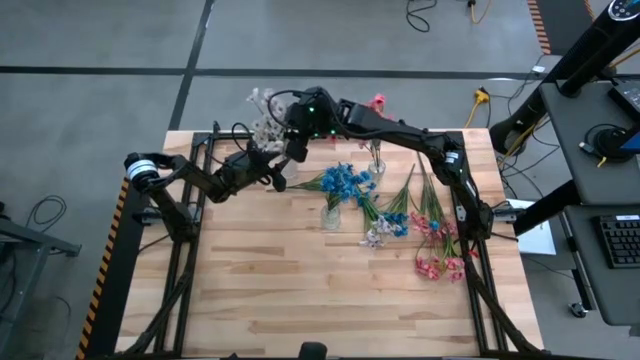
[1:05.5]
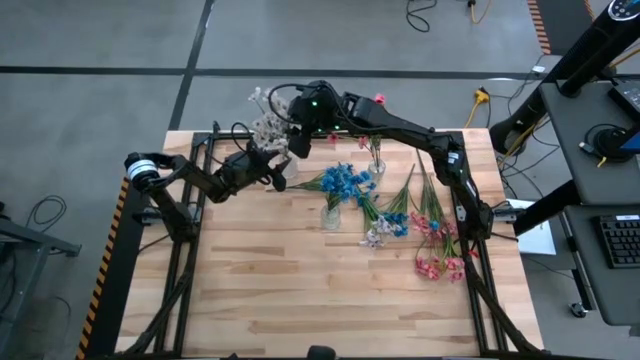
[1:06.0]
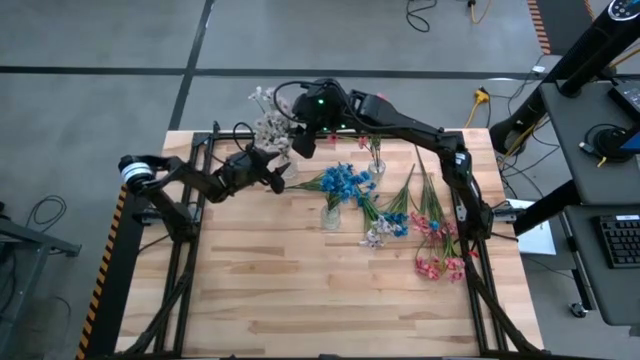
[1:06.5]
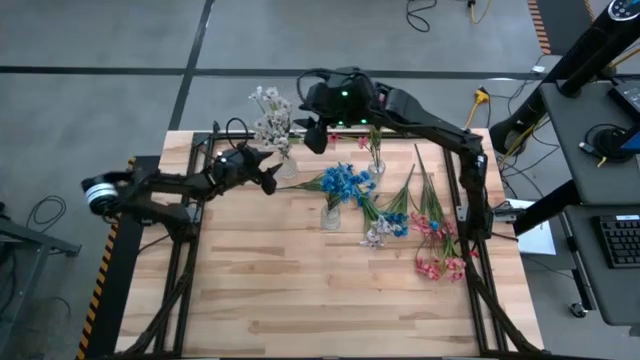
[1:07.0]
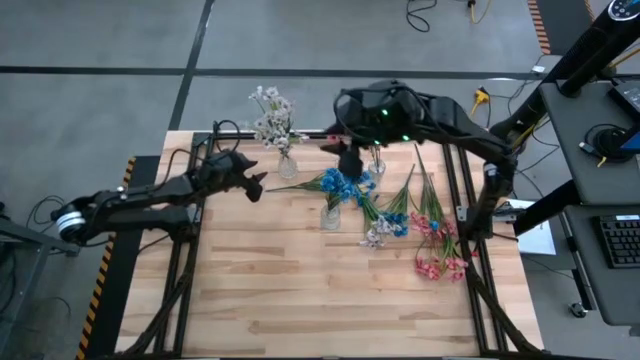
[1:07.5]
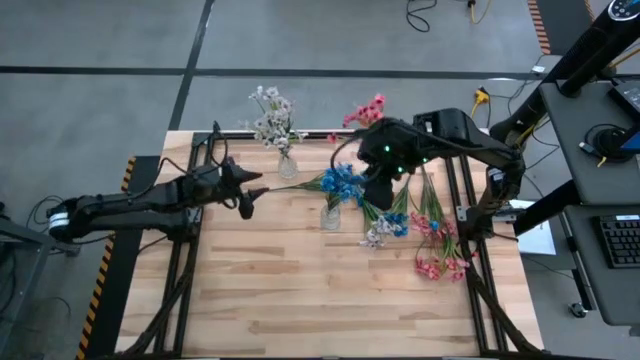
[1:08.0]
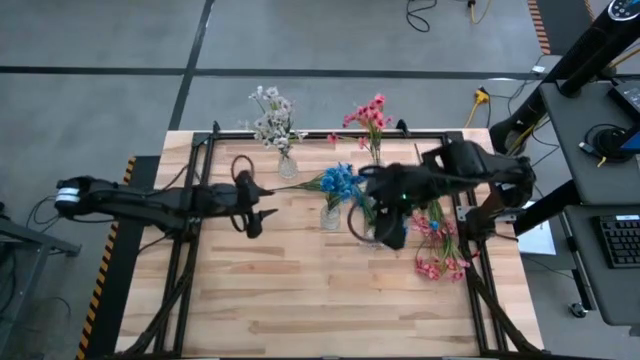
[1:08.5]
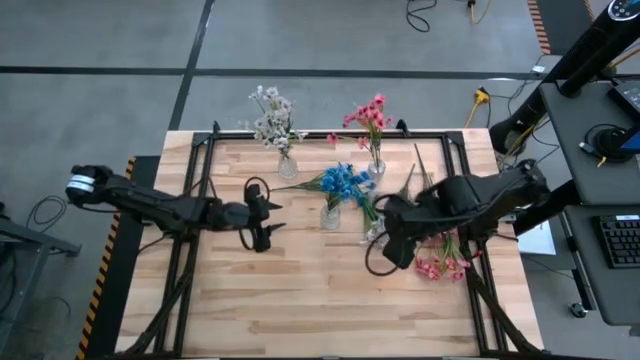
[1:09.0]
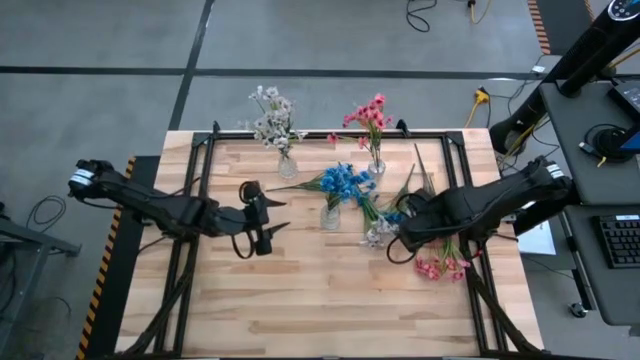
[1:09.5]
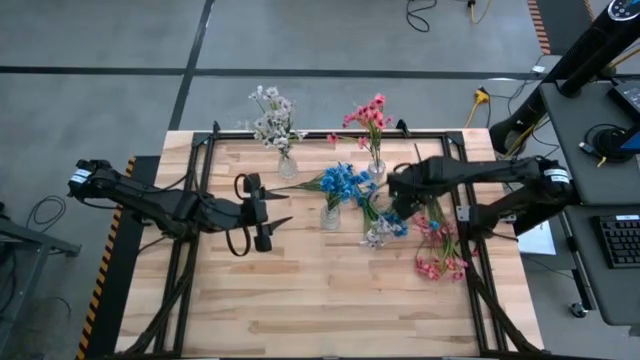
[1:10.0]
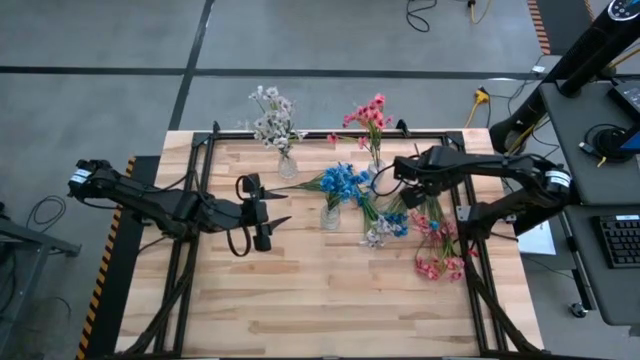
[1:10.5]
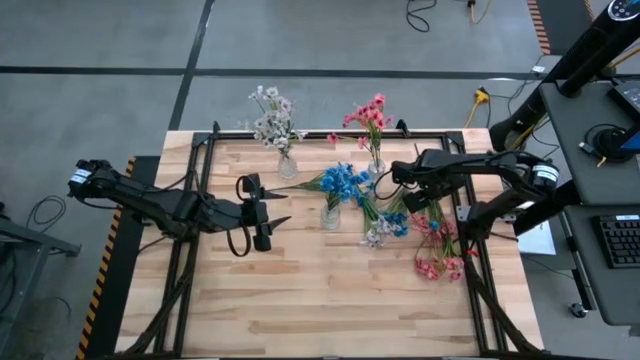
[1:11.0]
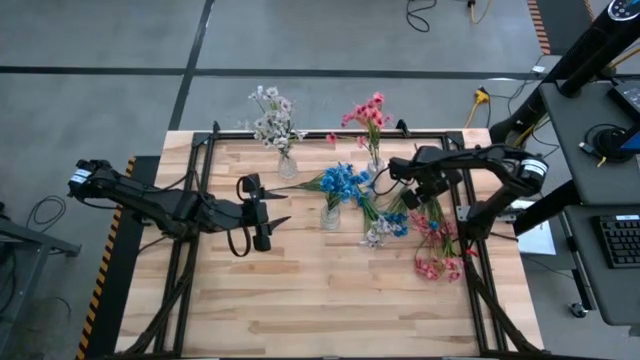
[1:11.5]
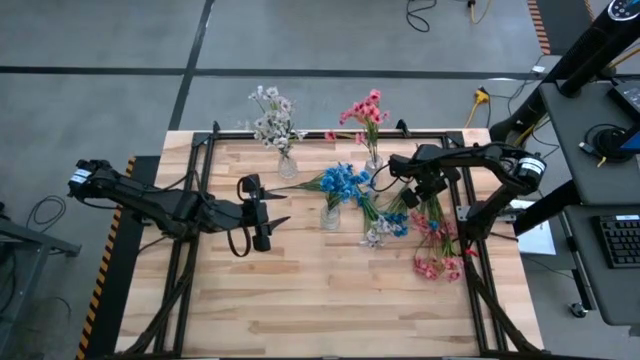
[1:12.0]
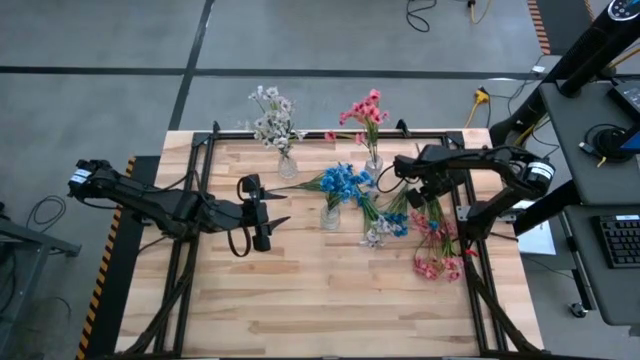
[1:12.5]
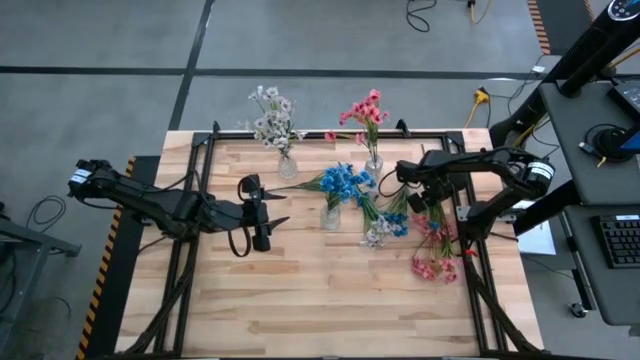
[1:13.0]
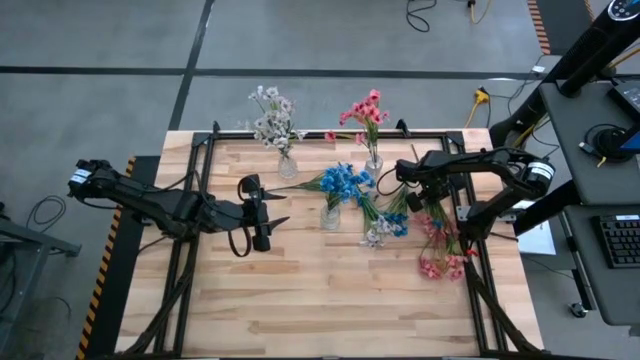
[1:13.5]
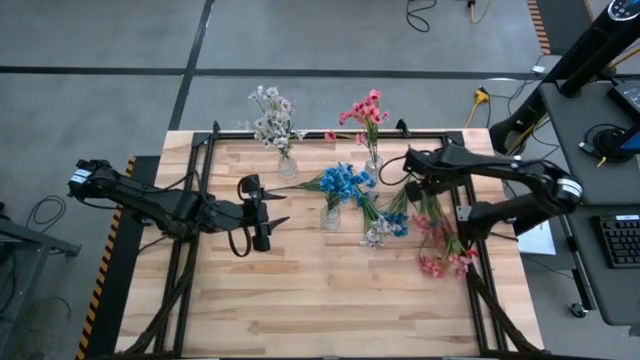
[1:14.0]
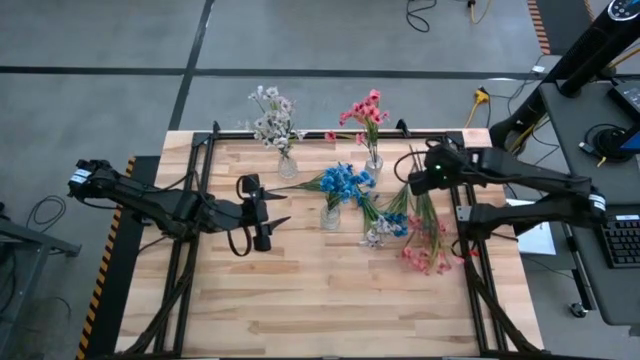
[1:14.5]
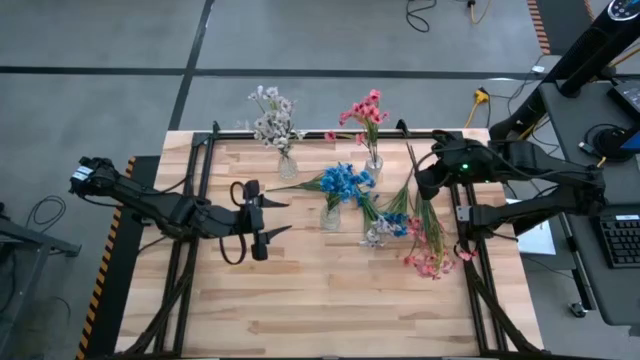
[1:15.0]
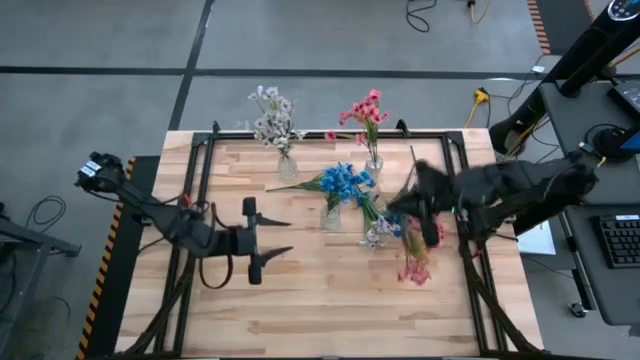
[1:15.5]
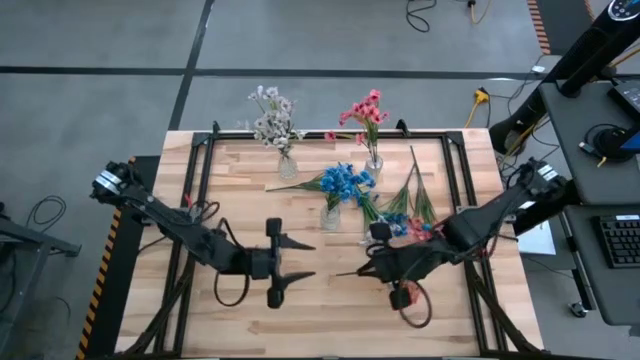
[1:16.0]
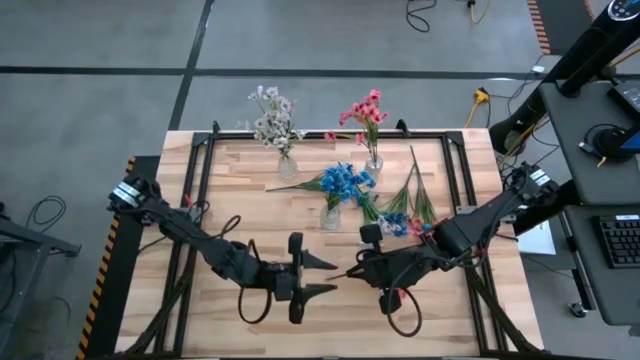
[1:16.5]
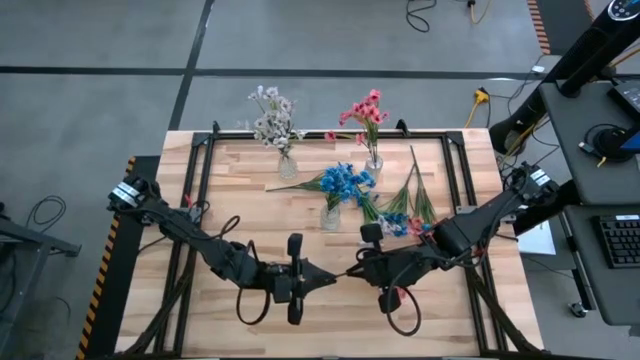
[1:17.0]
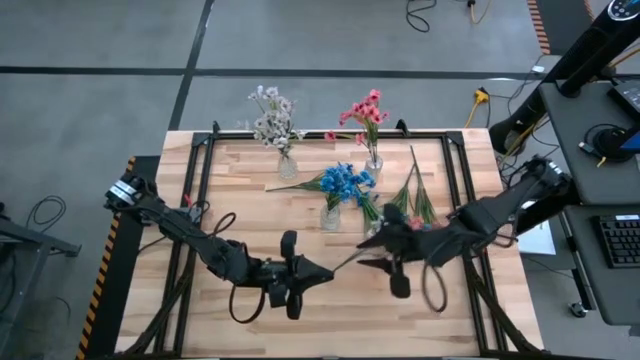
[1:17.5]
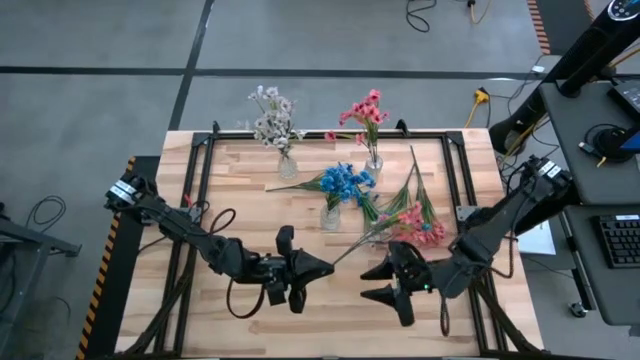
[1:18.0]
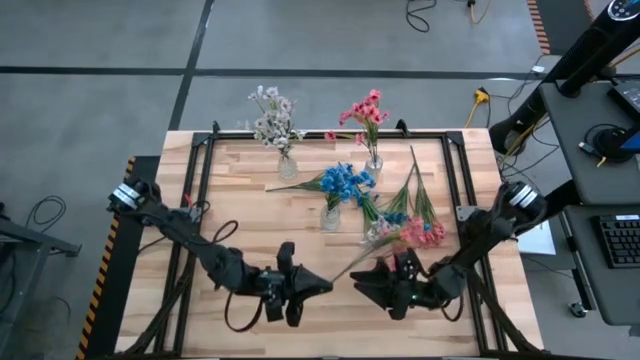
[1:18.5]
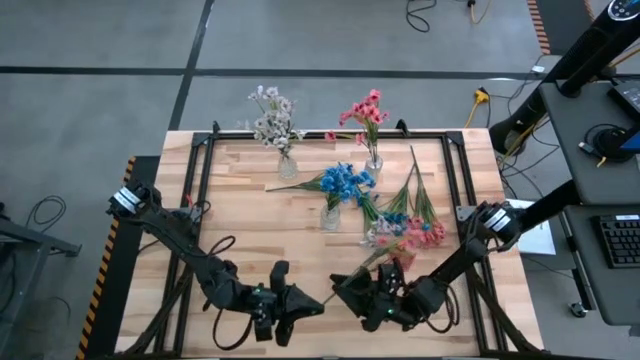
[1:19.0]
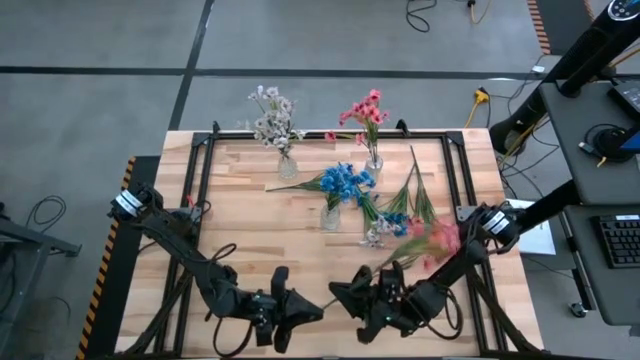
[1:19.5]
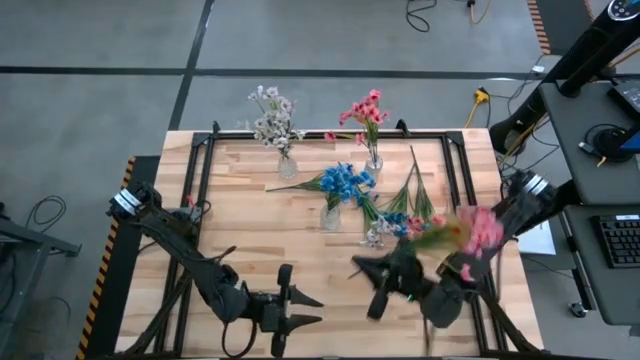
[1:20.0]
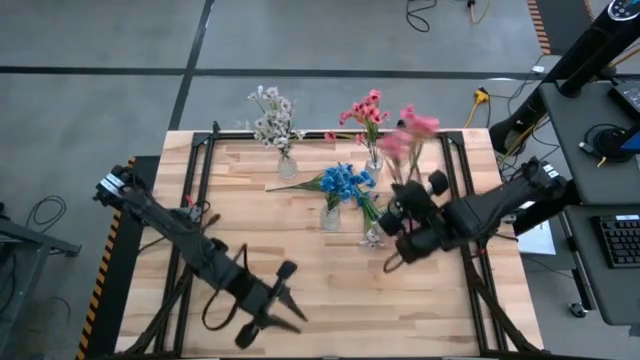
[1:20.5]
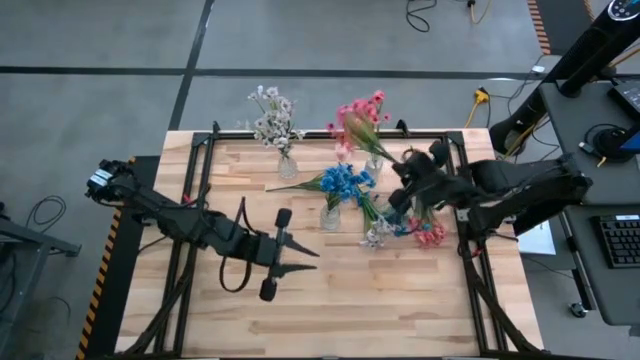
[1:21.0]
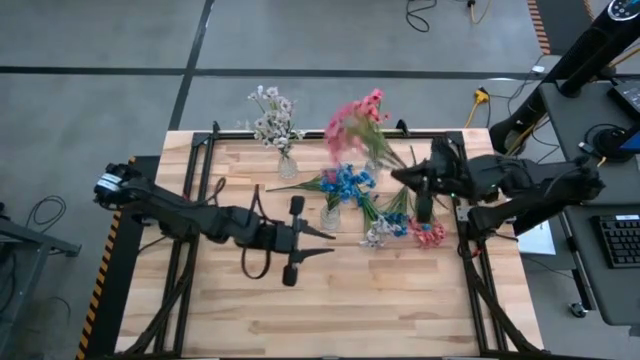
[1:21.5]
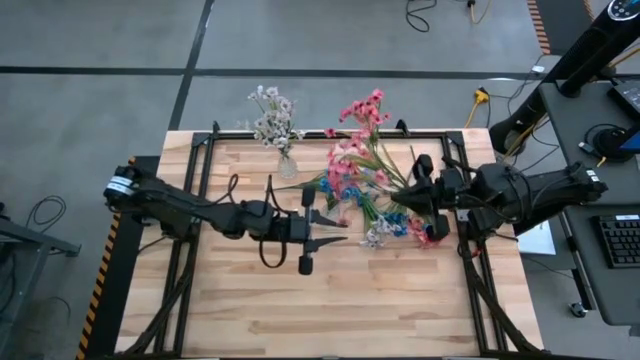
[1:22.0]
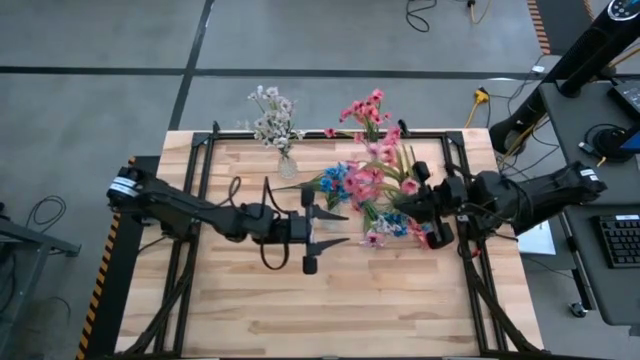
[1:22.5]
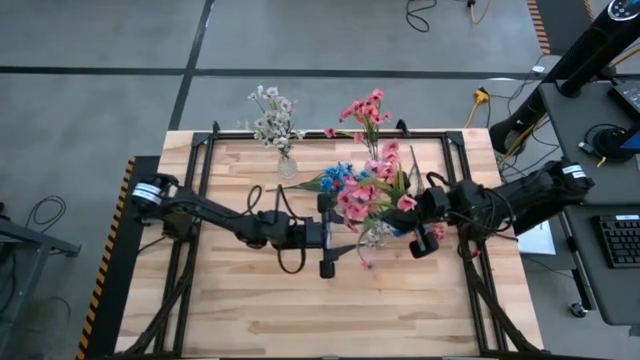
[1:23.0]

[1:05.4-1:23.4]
Task: Sort flowers into vase by color
Put the right pink flowers into the right transparent vase

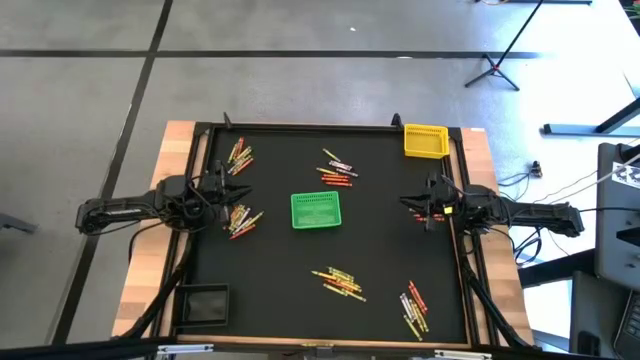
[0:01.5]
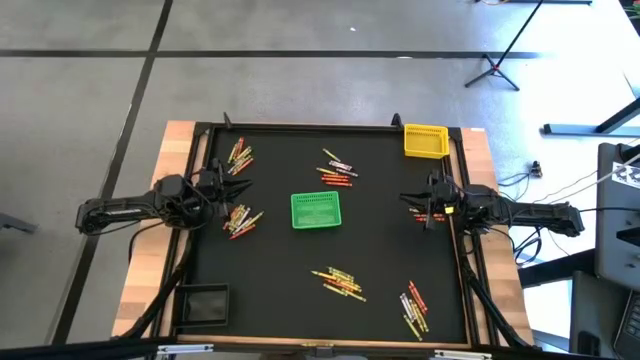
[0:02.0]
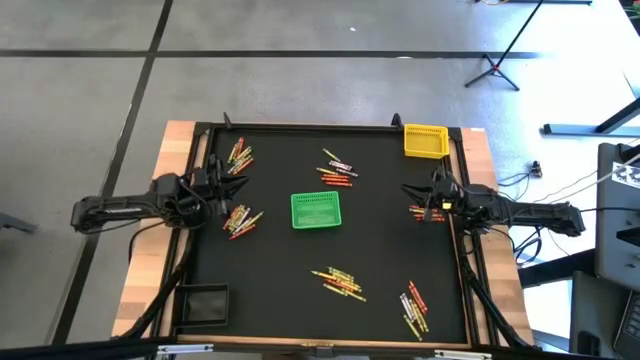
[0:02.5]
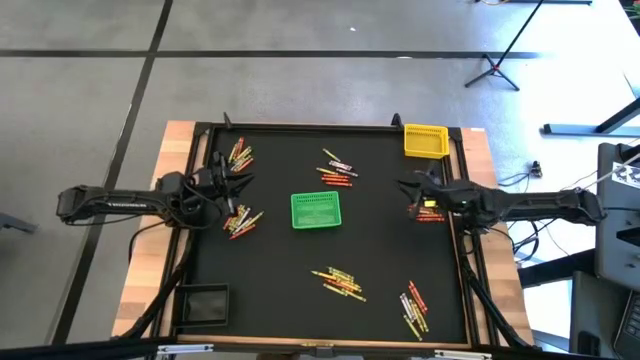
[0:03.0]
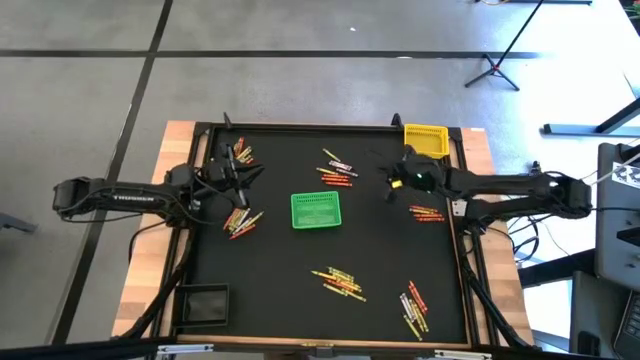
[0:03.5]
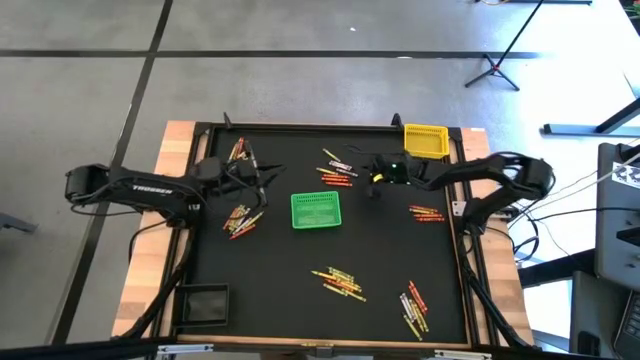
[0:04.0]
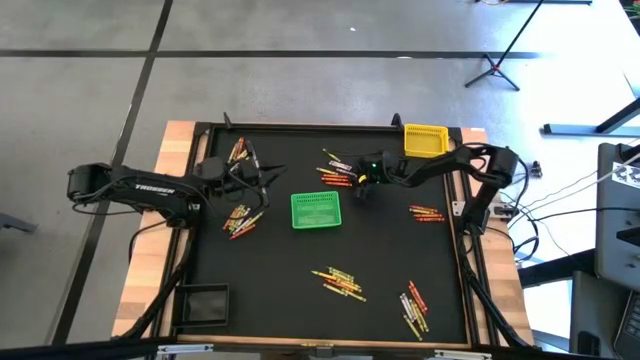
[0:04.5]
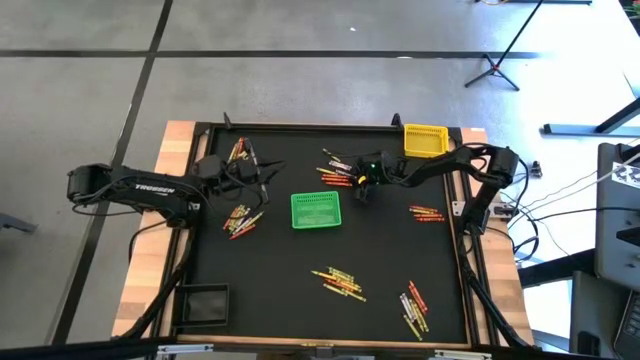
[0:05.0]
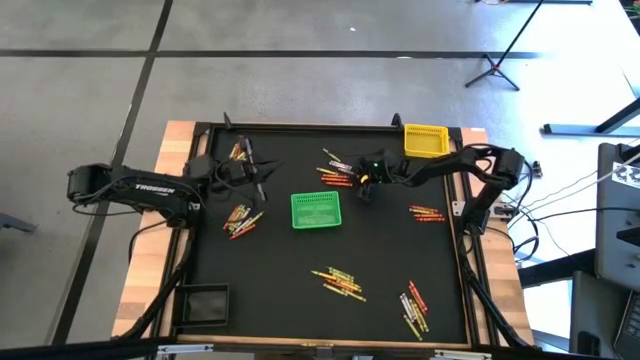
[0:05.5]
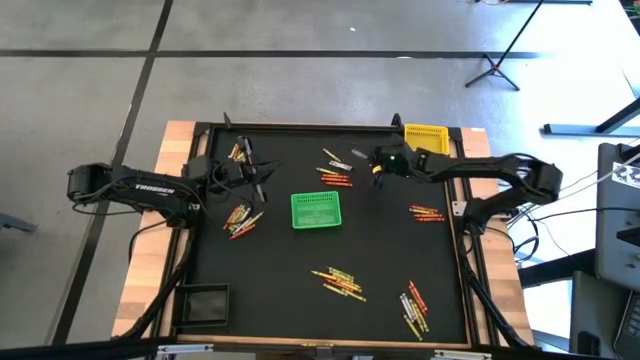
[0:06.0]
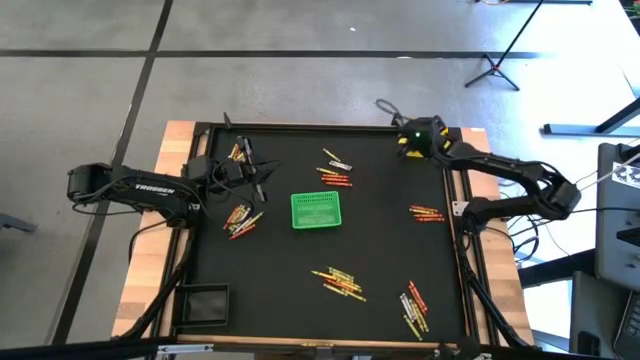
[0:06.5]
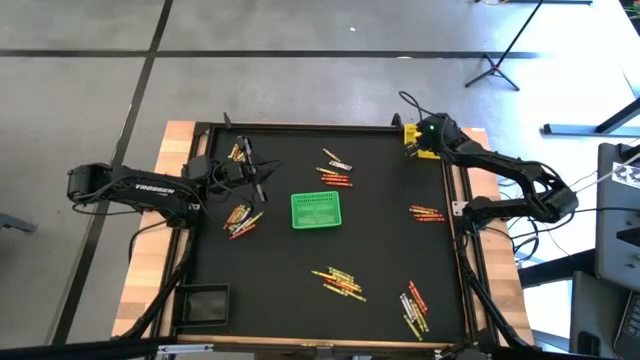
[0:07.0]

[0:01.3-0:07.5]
Task: Sort crayons
Put the black crayon into the yellow bin
